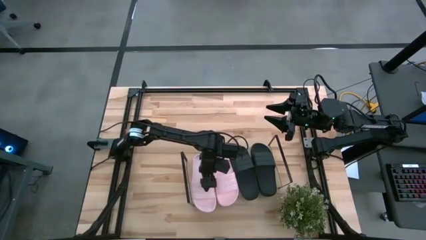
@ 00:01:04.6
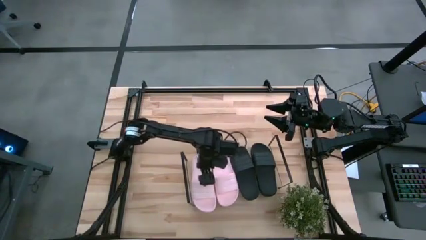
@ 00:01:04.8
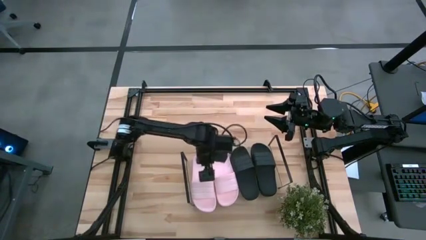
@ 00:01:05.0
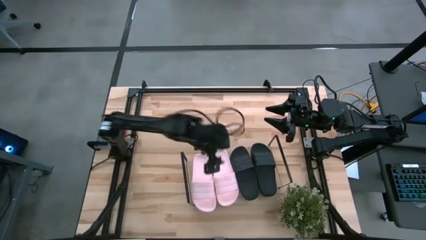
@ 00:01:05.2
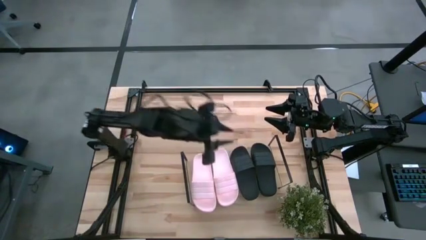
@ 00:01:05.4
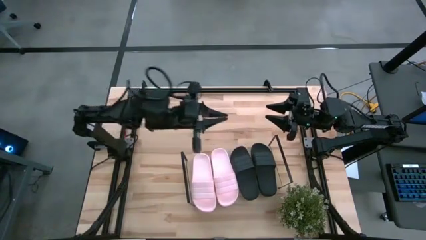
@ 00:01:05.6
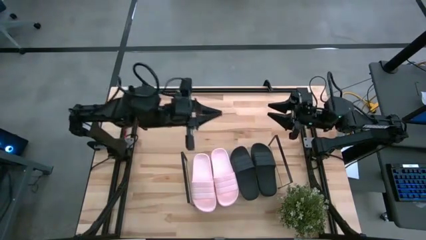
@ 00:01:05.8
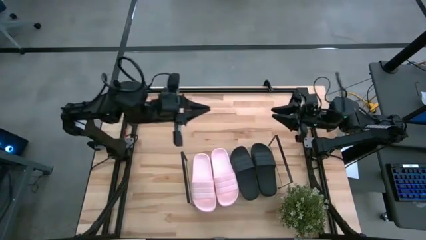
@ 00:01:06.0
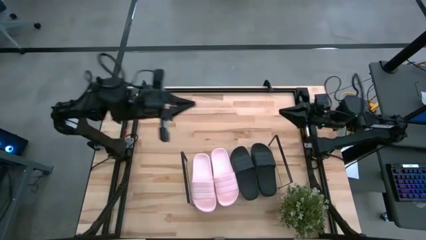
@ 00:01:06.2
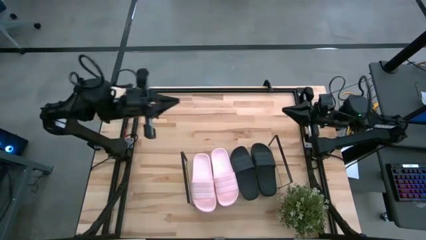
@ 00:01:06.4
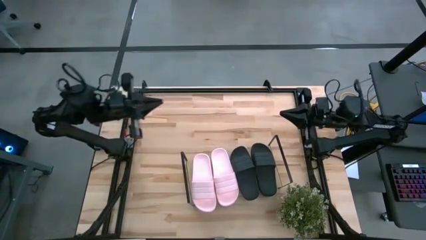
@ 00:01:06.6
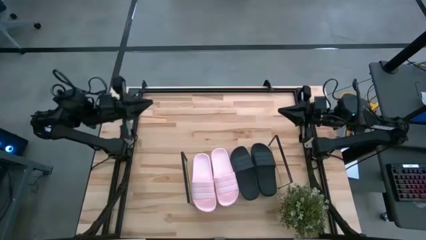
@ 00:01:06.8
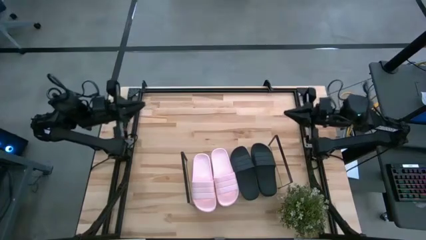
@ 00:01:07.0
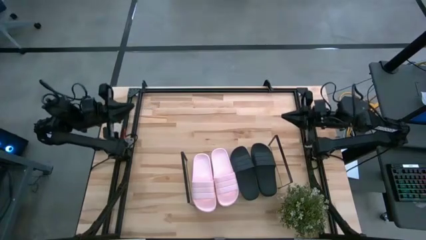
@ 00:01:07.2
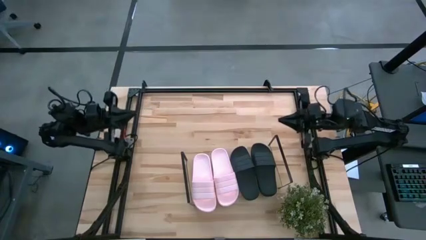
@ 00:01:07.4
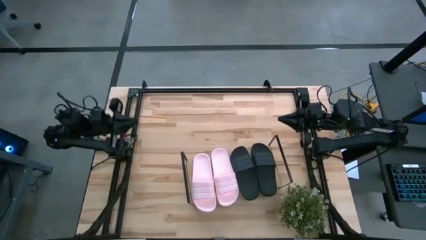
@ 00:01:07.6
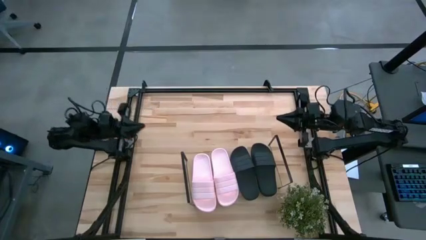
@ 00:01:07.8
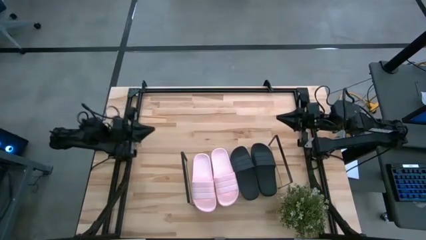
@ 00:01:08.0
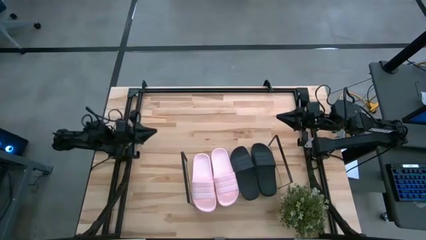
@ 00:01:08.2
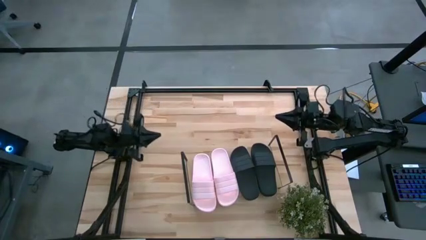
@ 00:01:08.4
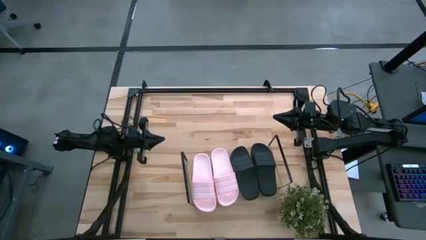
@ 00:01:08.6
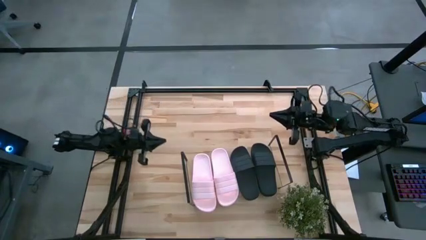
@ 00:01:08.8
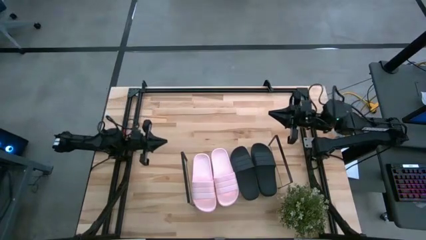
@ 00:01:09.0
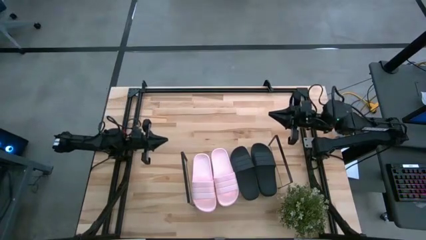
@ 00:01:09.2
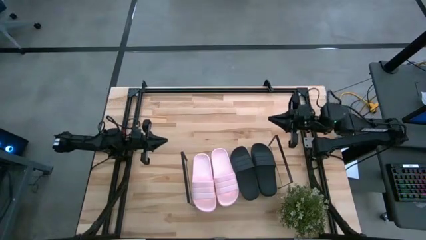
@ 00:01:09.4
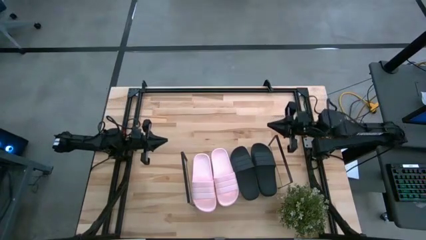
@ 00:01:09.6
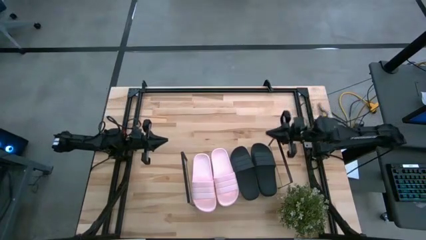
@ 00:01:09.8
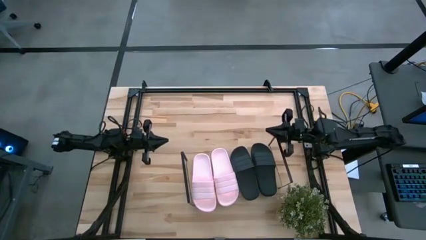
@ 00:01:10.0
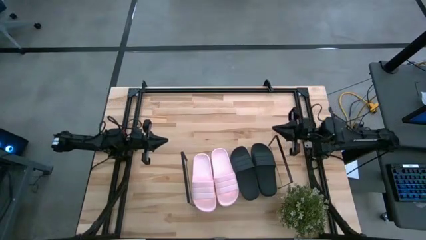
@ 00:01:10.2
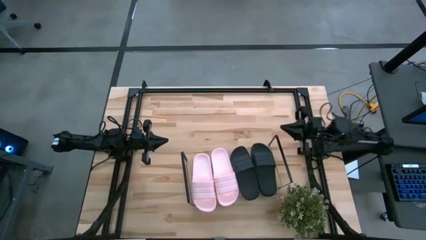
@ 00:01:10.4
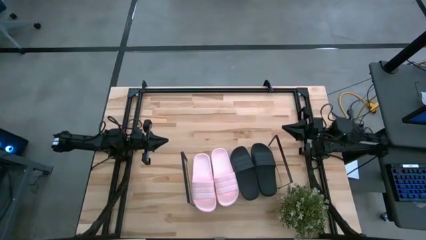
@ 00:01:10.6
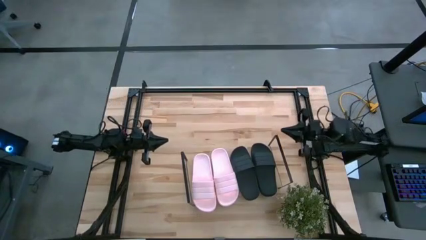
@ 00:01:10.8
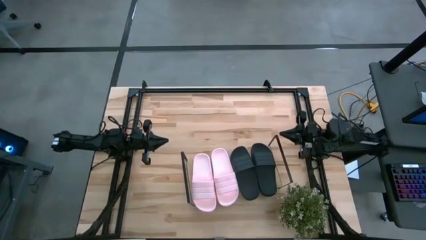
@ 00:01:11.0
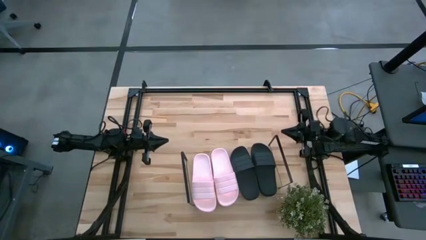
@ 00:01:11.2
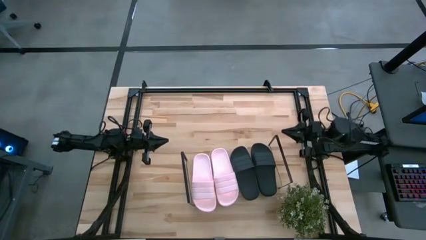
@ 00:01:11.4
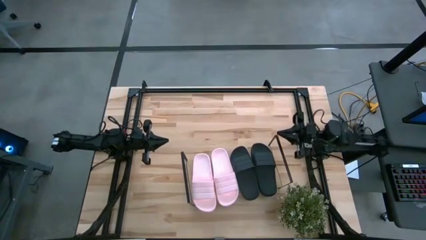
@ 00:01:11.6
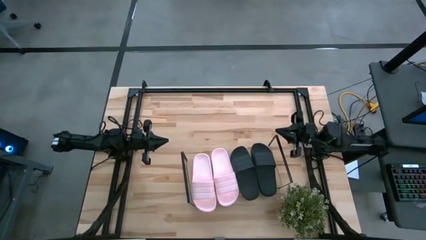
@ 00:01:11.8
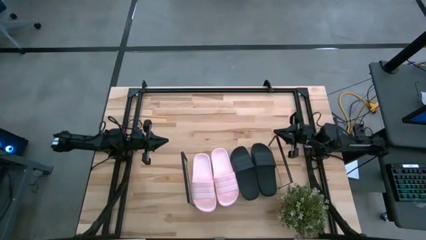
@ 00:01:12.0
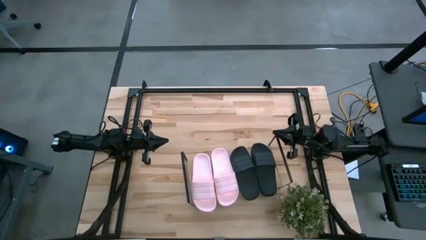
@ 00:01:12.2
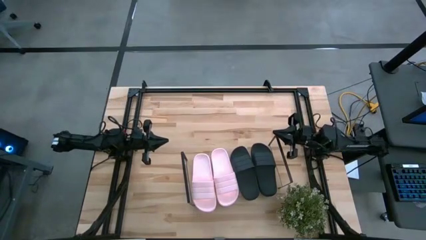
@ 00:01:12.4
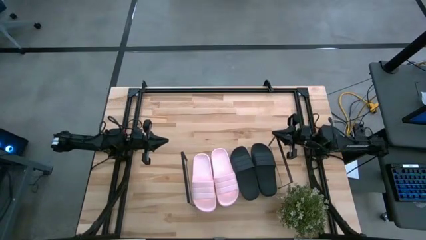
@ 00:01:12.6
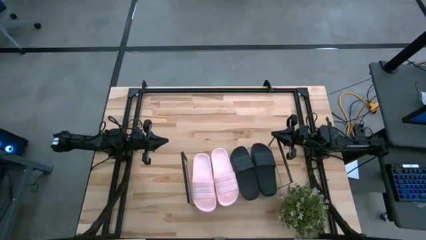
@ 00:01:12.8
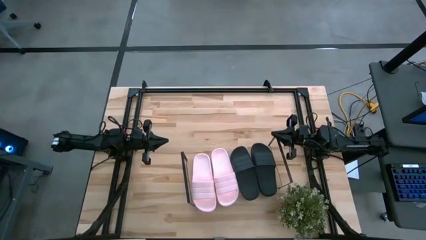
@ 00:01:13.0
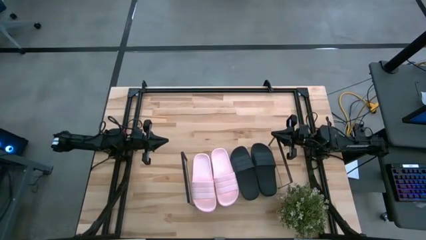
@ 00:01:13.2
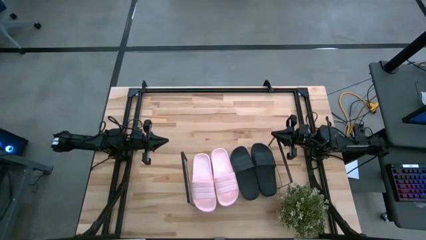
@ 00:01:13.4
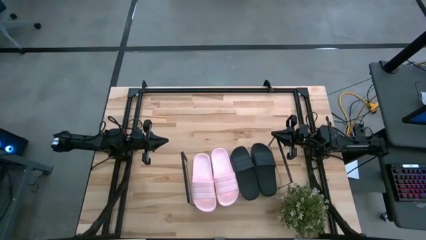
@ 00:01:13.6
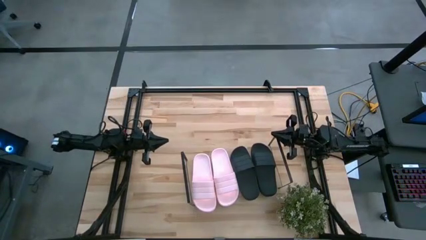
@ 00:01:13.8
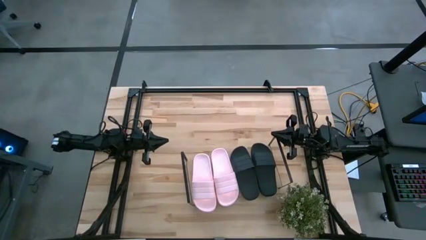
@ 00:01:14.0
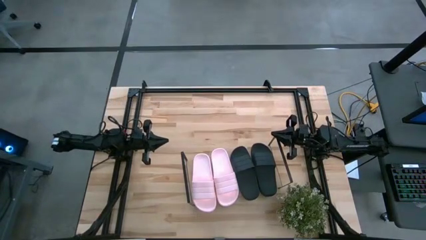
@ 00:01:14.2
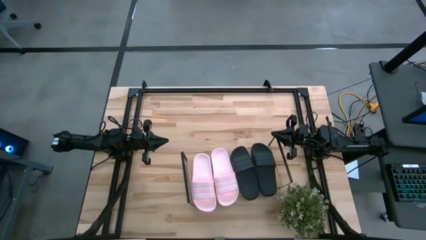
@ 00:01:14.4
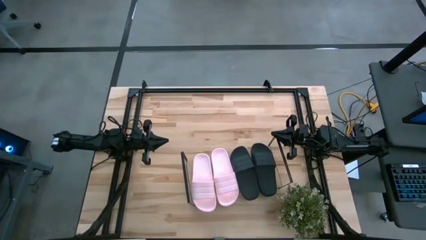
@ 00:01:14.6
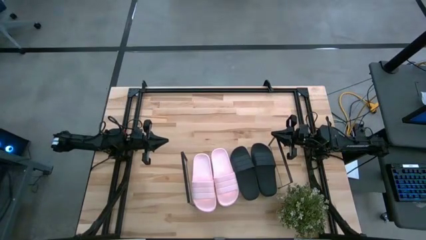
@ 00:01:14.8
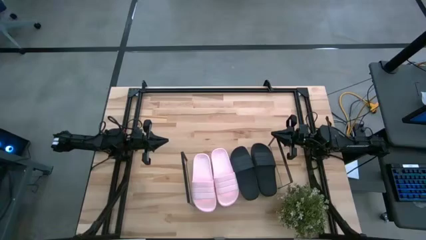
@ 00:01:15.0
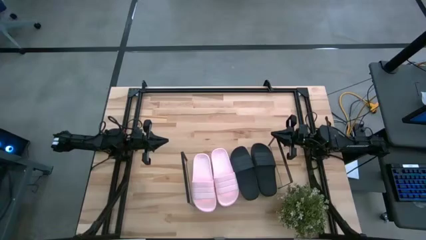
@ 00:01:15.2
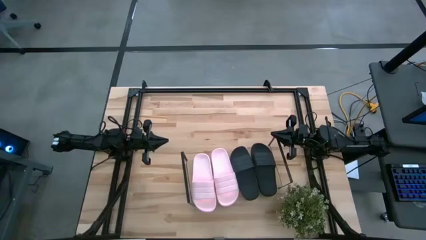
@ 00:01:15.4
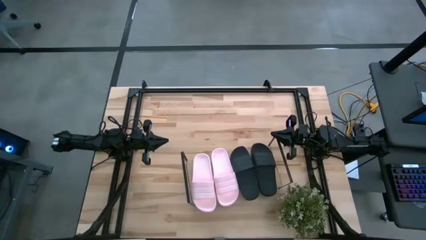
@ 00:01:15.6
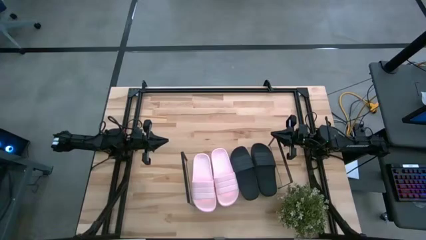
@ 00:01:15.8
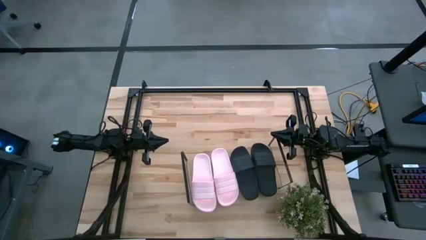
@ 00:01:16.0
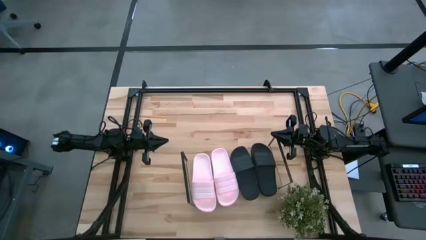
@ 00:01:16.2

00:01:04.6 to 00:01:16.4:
Task: Pick and place slides into the shelf
Return to Home Position

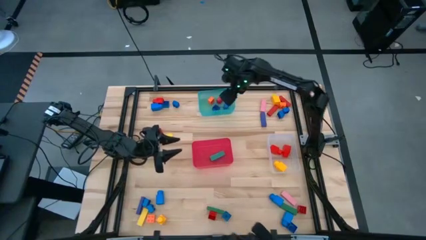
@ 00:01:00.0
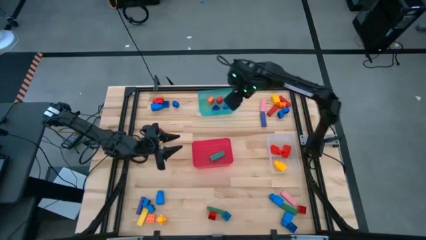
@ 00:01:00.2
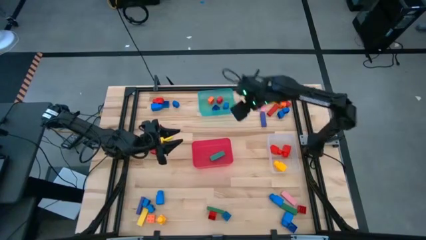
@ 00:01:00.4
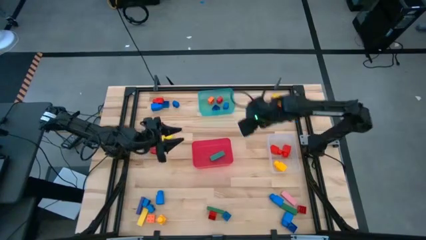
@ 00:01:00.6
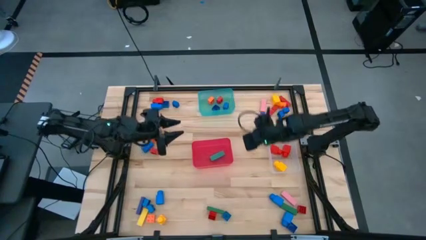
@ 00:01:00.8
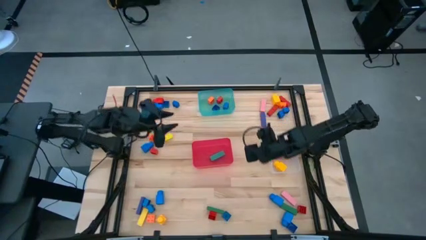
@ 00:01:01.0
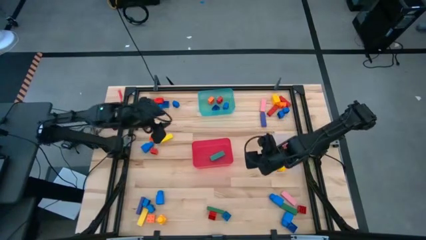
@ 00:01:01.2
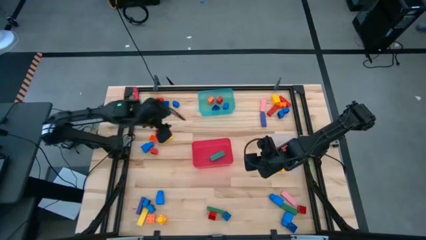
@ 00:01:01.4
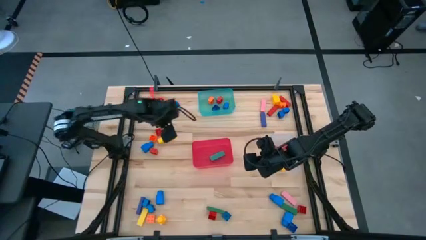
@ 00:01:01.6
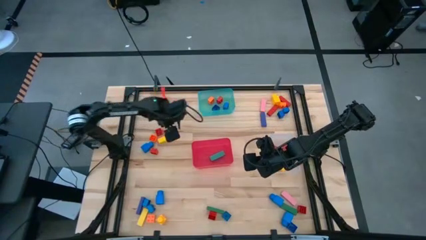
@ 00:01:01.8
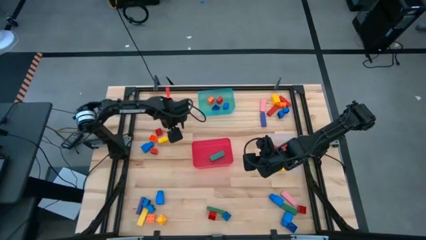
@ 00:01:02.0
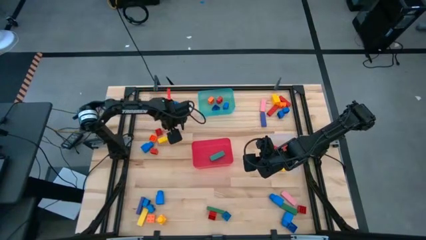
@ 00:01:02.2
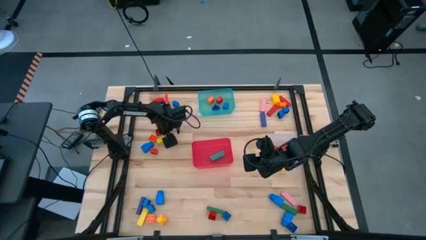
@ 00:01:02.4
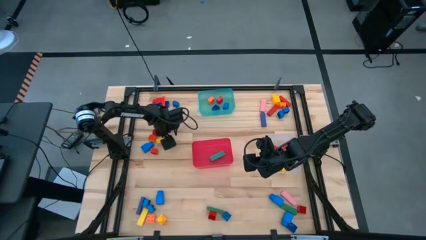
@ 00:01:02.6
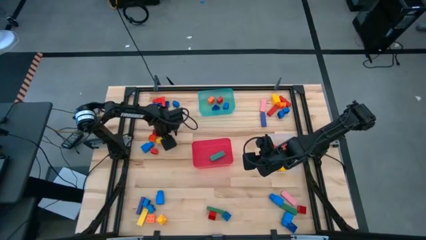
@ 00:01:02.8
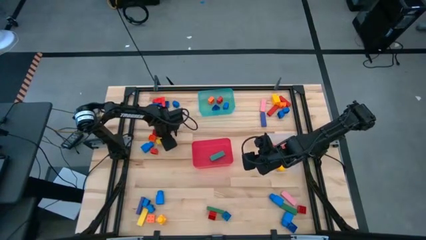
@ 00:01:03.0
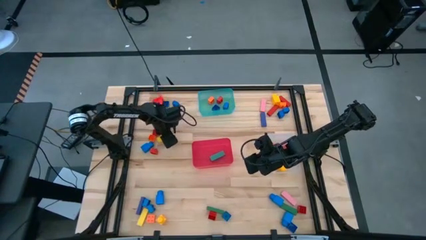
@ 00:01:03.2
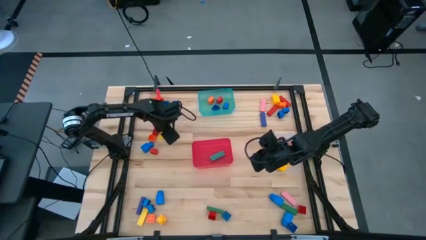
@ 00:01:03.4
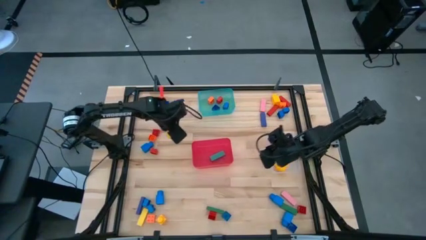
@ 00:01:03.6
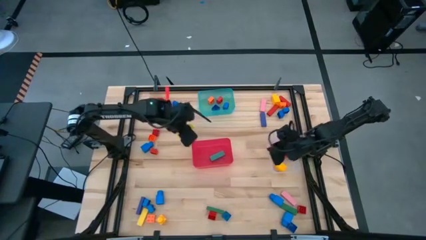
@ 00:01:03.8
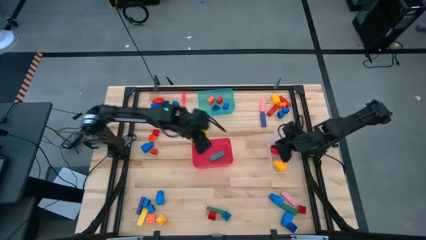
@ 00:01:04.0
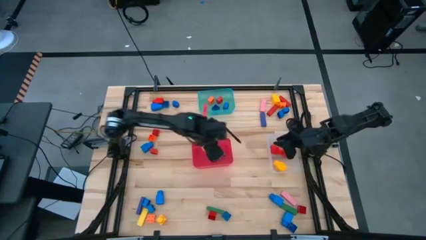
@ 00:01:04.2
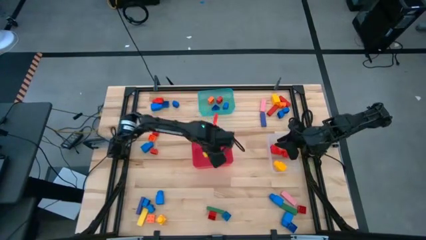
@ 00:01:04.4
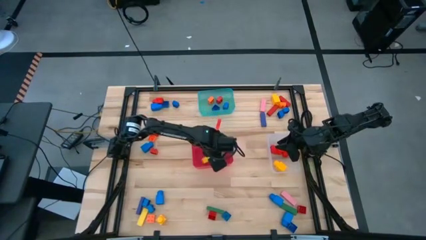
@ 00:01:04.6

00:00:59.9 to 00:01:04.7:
Task: Sort blocks by size
Put the yellow block into the red bin
